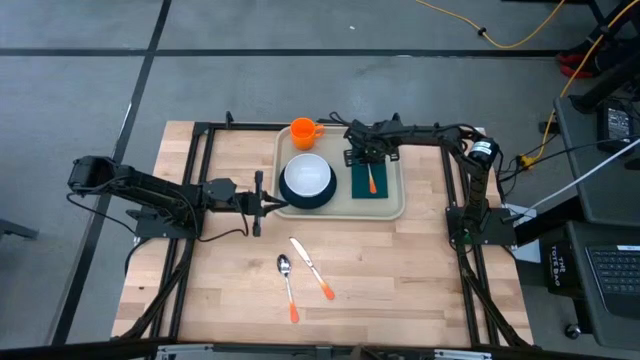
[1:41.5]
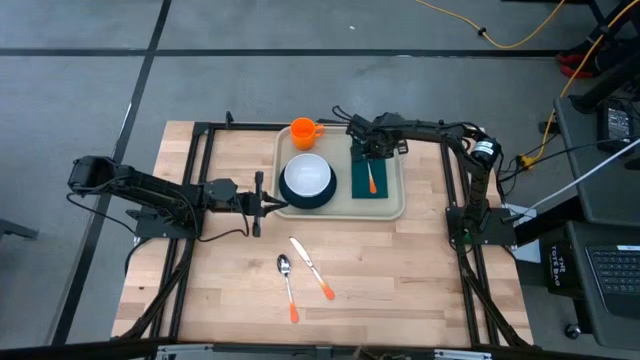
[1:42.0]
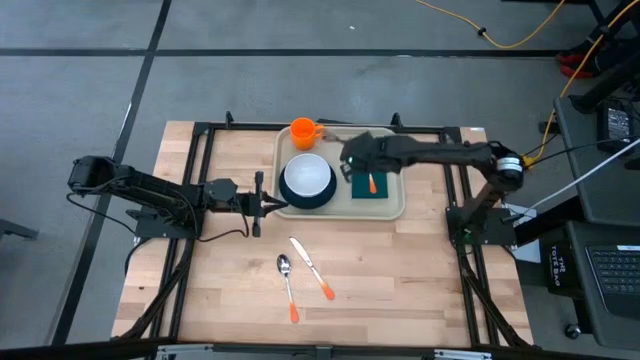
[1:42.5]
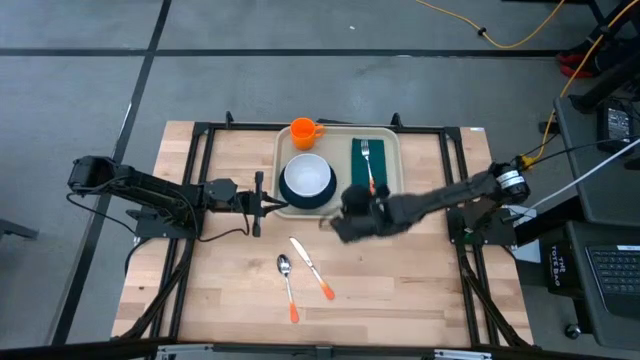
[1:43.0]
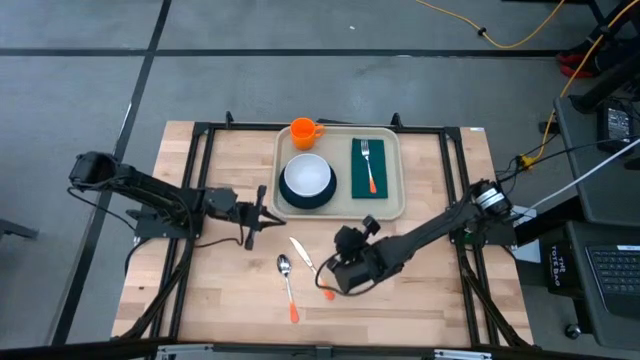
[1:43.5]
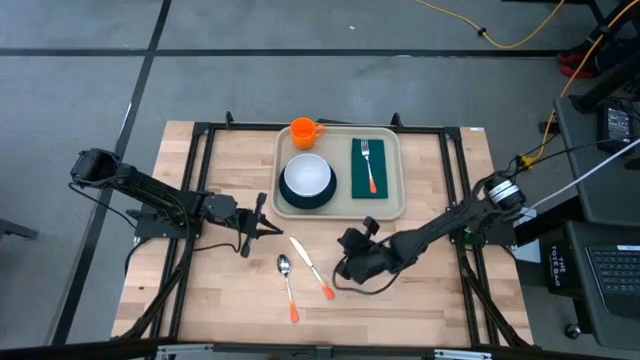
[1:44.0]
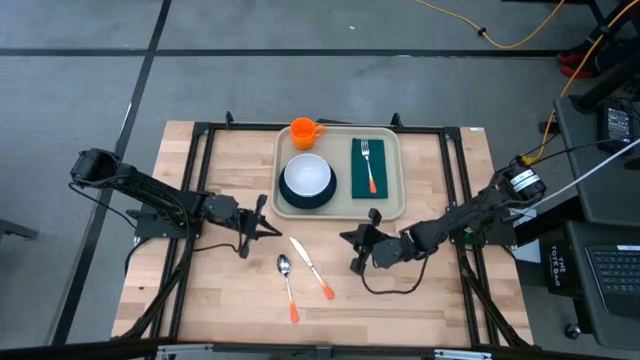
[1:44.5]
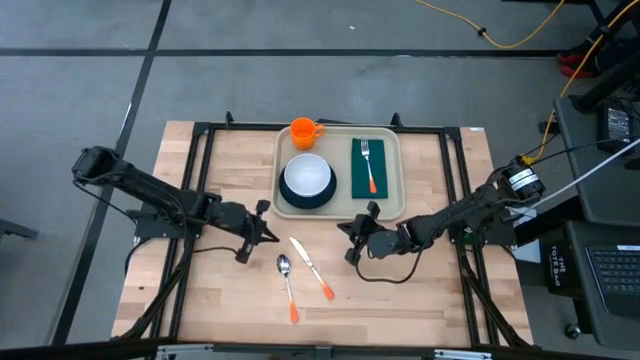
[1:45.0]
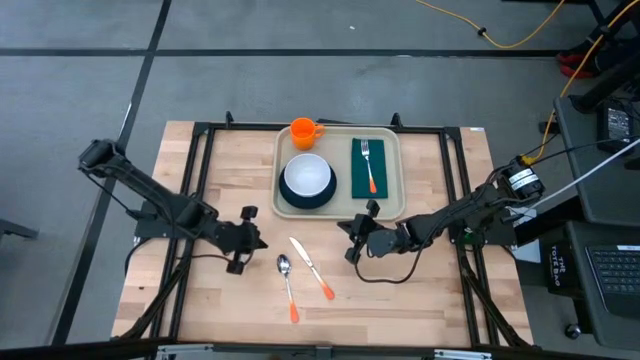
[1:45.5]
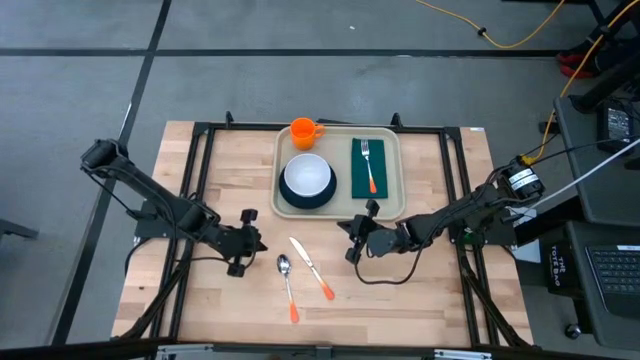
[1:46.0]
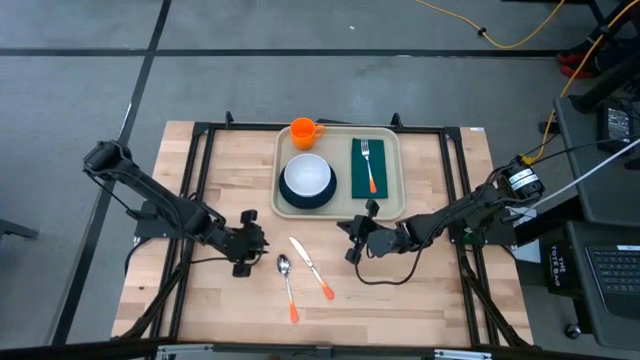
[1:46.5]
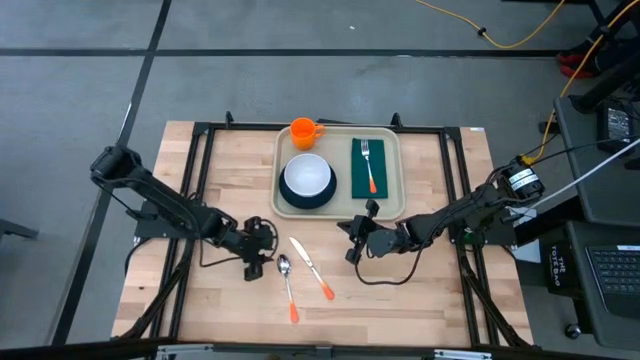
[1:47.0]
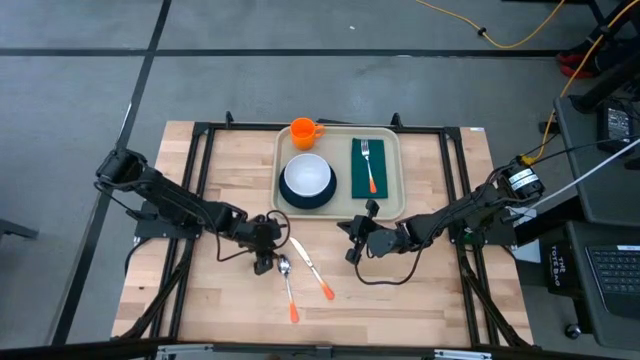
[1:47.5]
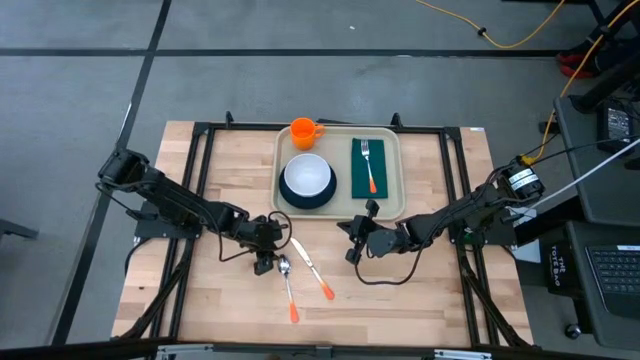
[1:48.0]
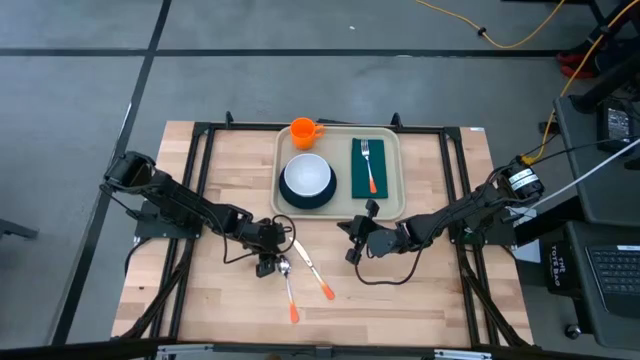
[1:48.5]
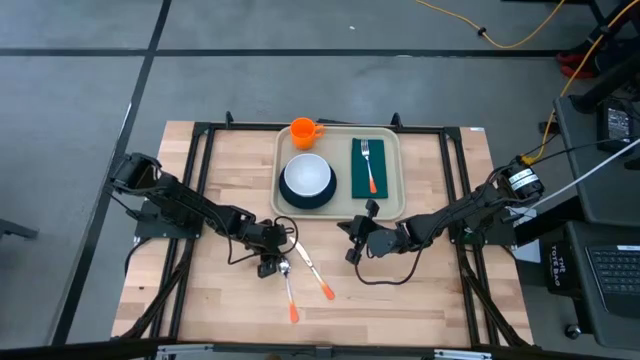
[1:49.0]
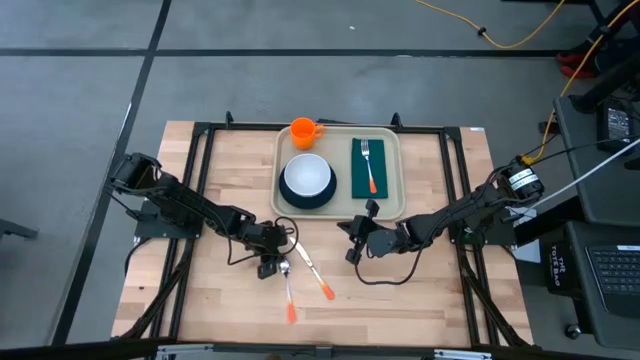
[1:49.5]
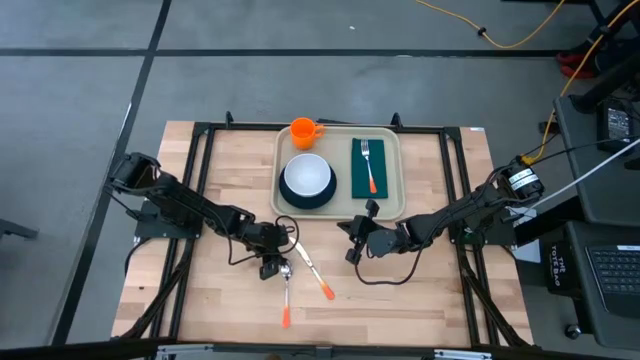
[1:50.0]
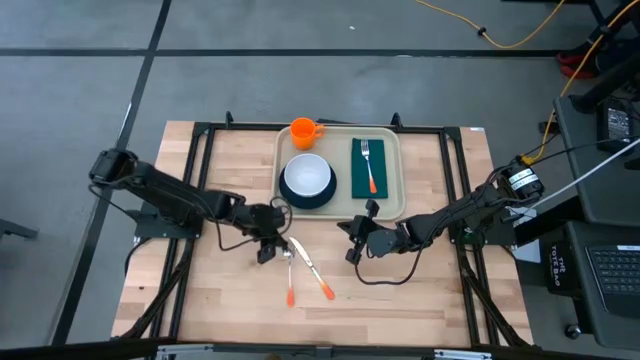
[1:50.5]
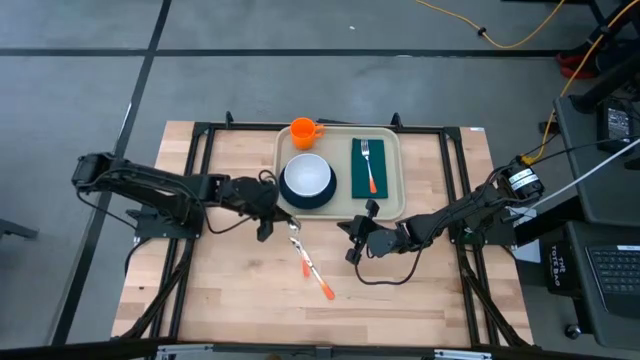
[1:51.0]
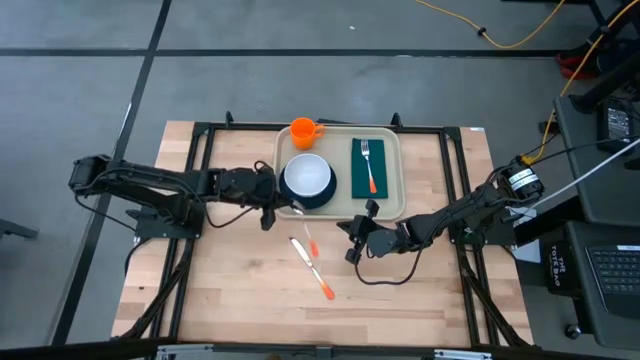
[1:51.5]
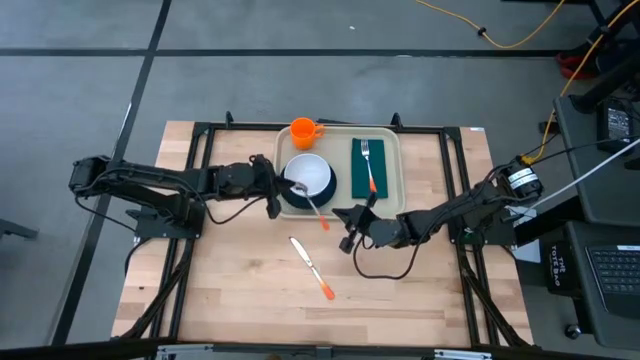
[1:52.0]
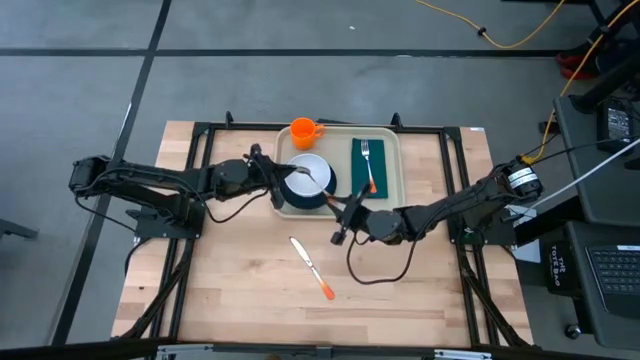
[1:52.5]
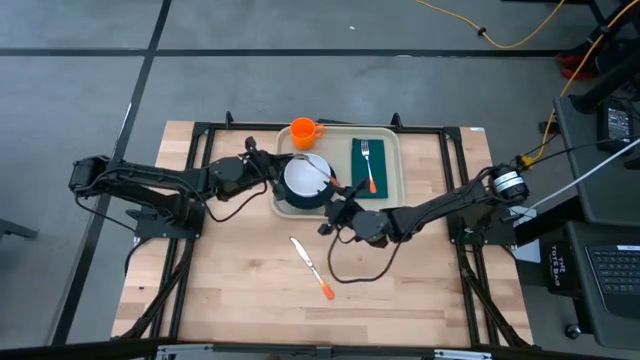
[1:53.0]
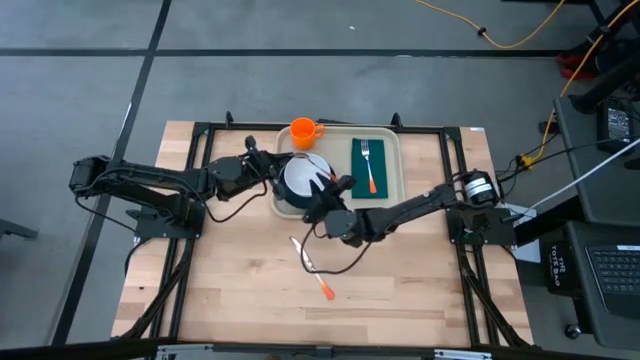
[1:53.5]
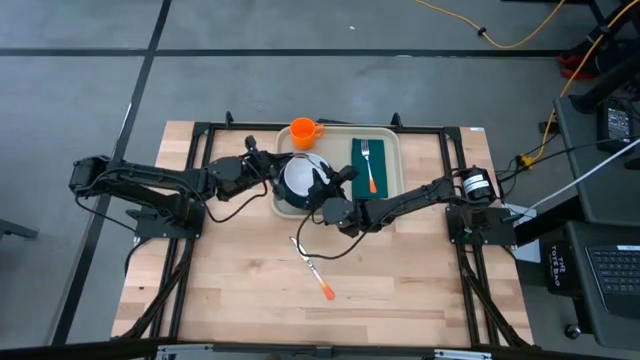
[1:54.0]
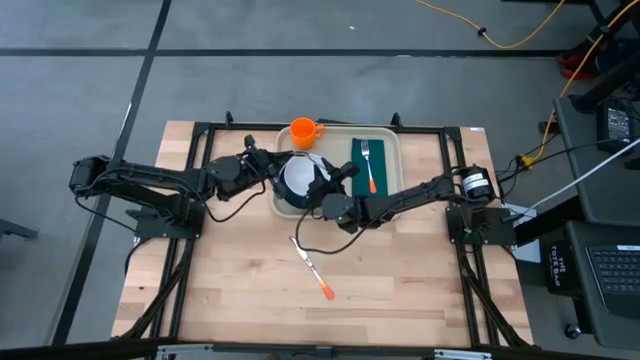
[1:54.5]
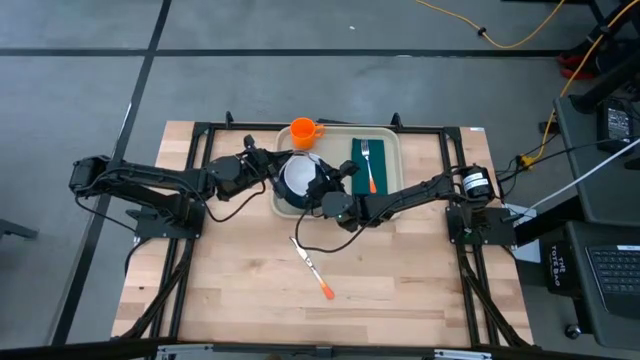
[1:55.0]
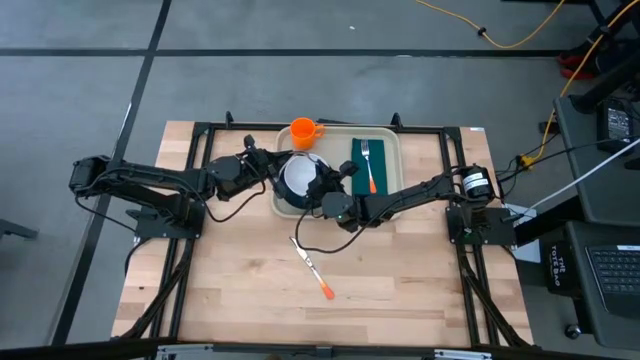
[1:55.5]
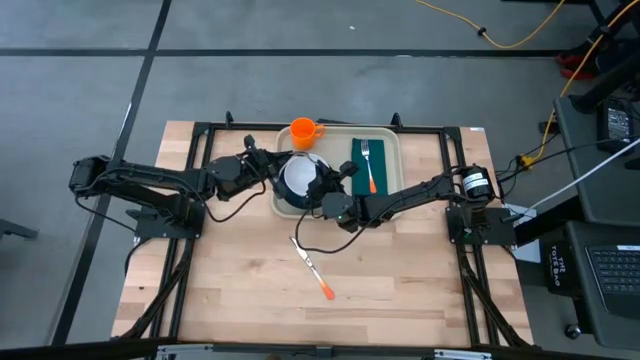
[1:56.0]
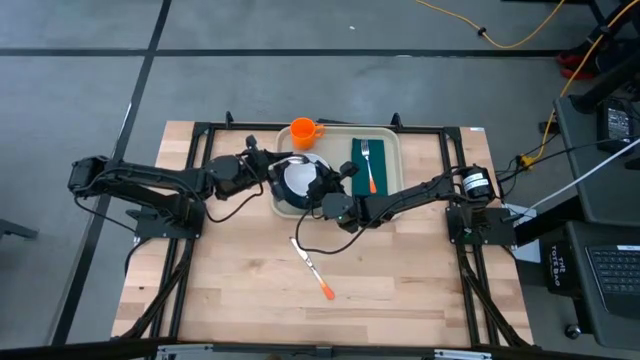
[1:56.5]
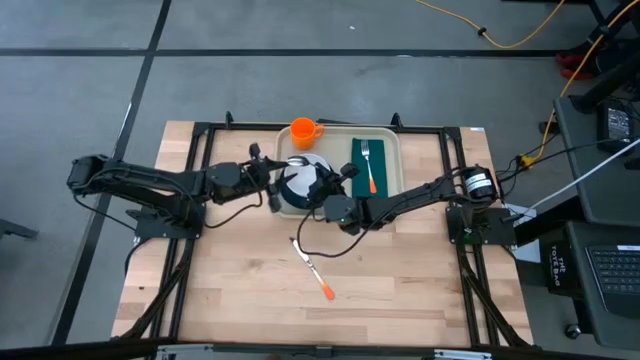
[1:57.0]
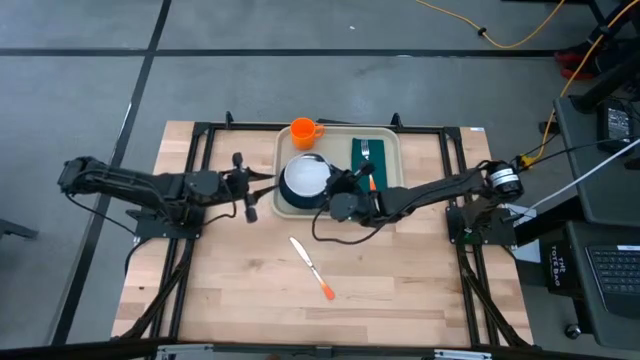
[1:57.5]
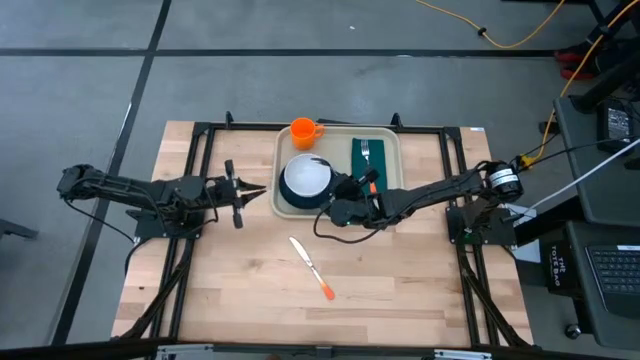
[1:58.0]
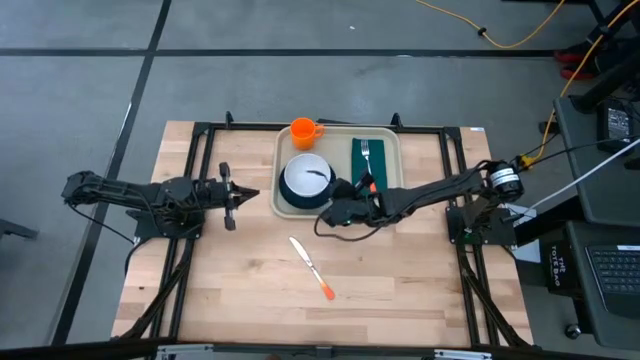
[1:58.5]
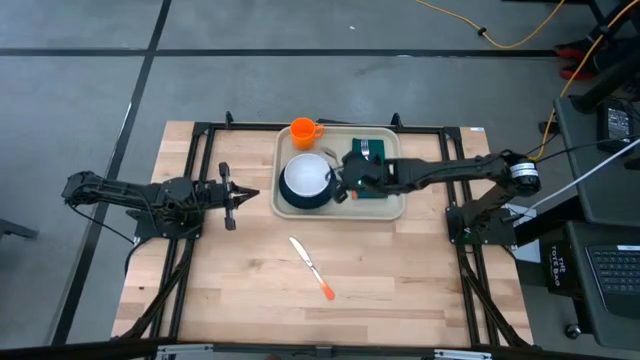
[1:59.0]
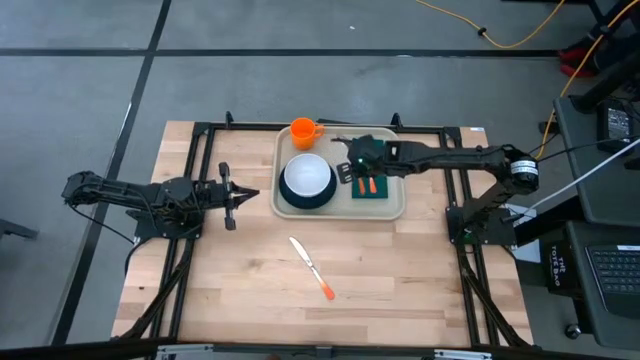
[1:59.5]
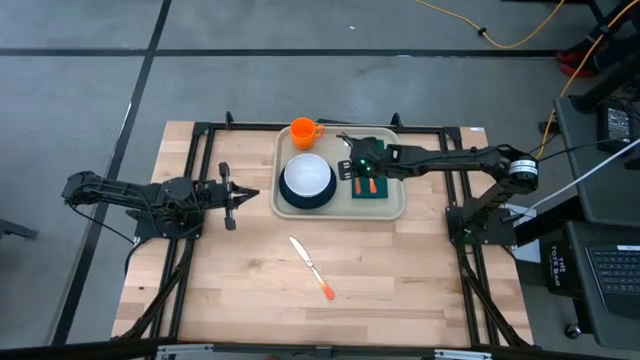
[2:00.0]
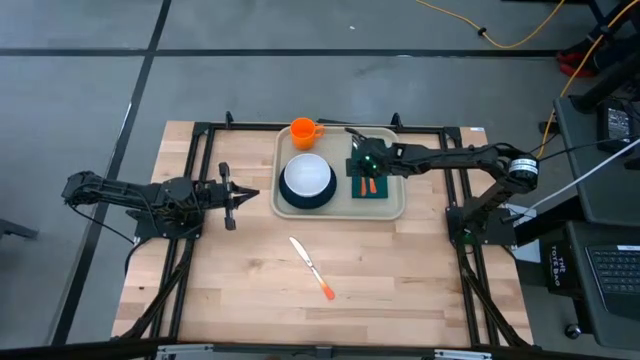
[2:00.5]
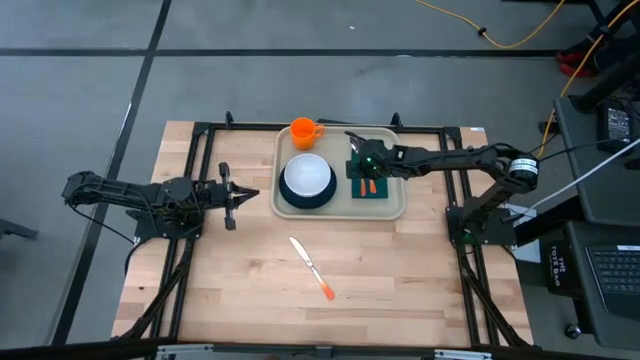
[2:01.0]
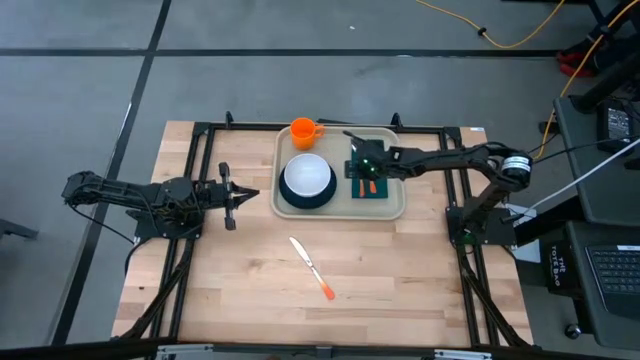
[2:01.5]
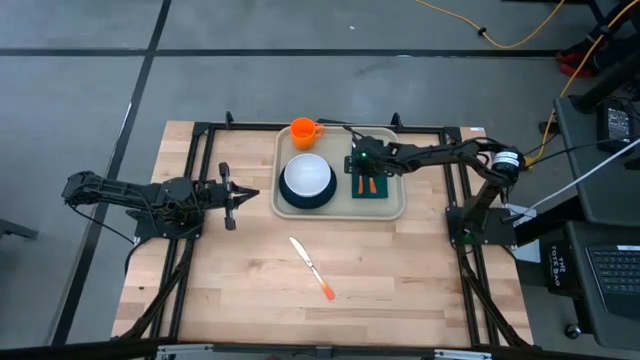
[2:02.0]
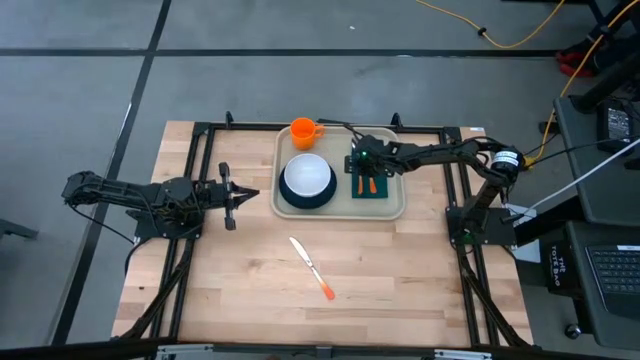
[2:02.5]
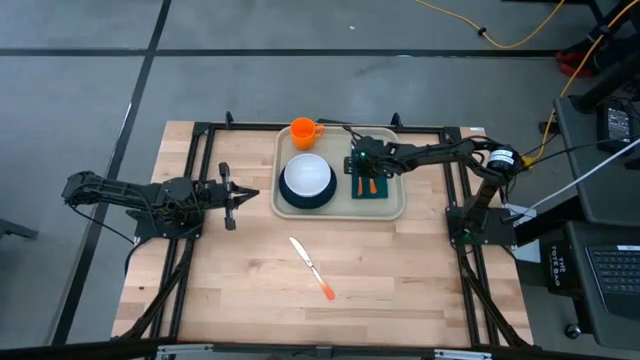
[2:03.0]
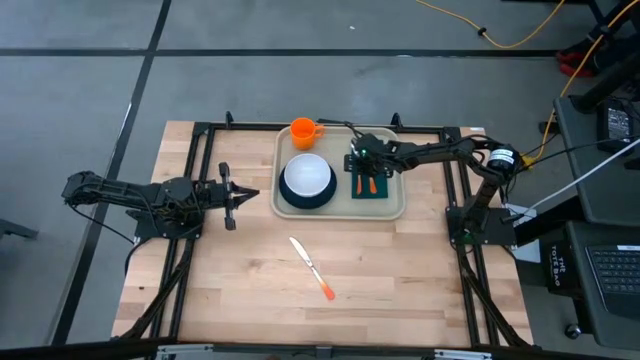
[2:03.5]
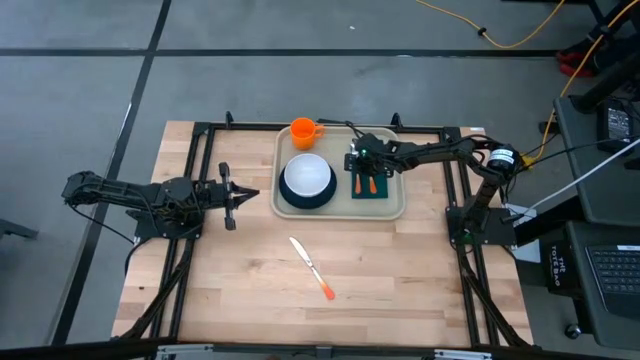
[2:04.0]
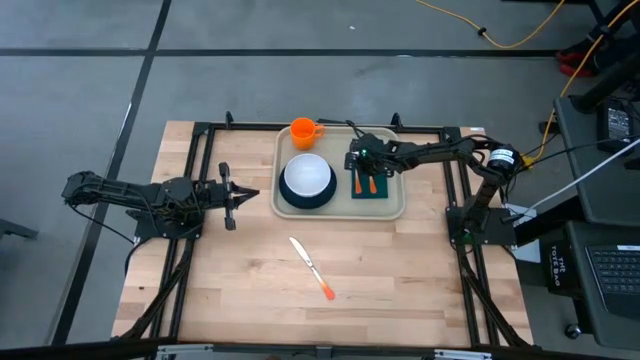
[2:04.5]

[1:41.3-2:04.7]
Task: Set up tray
Put the orange spoon on top of the dark green napkin on the gray tray
